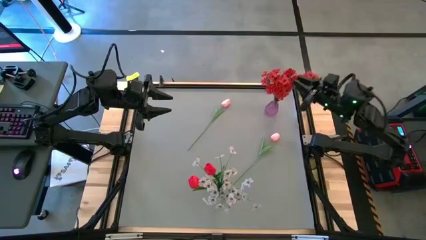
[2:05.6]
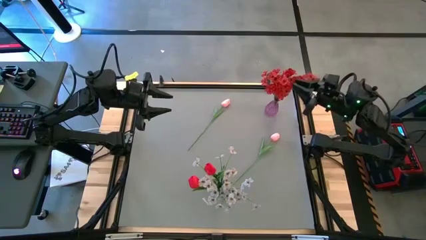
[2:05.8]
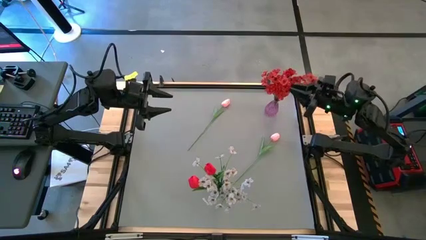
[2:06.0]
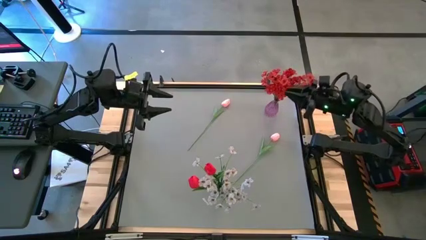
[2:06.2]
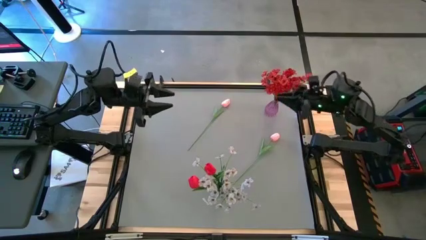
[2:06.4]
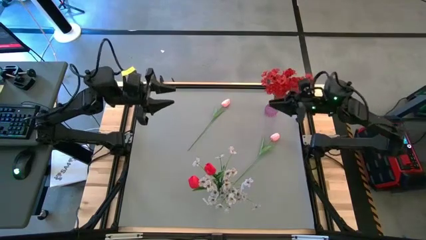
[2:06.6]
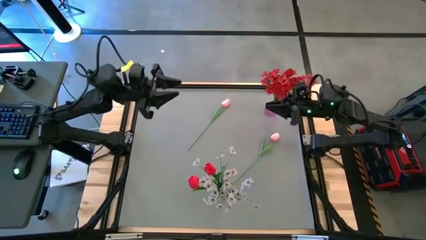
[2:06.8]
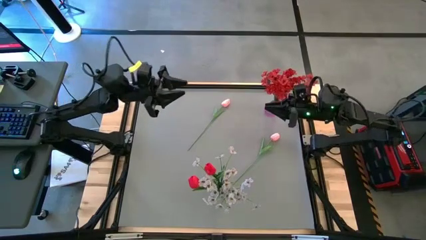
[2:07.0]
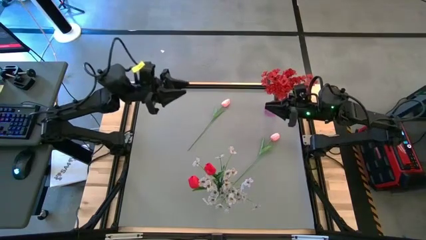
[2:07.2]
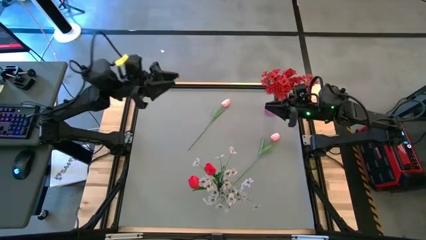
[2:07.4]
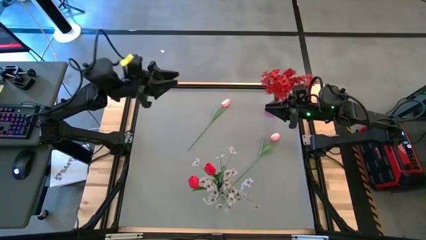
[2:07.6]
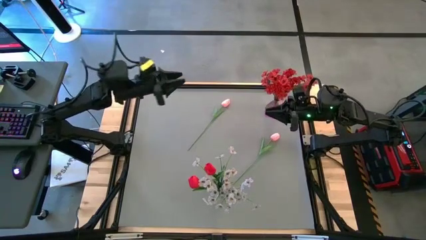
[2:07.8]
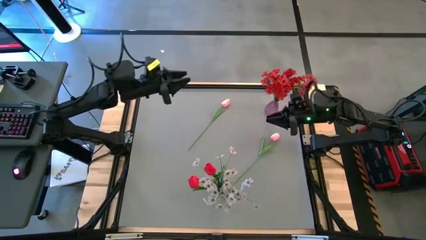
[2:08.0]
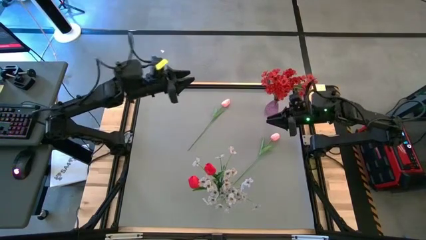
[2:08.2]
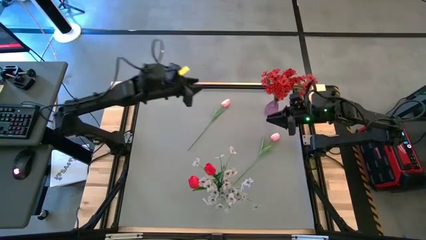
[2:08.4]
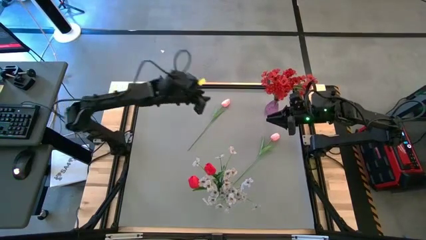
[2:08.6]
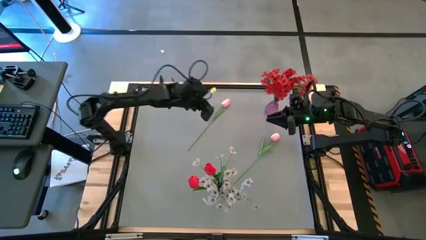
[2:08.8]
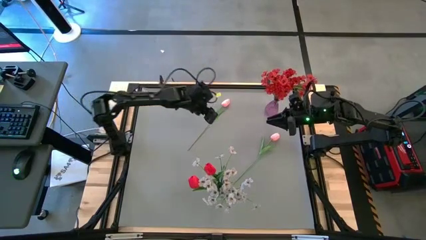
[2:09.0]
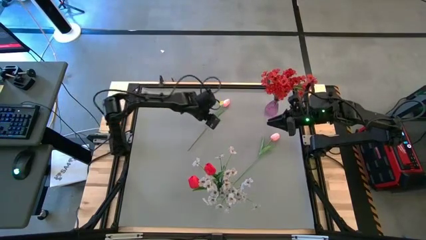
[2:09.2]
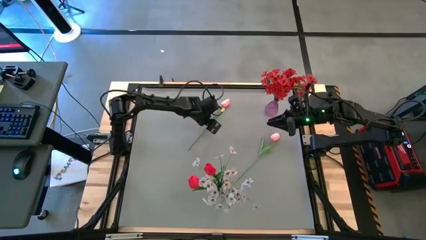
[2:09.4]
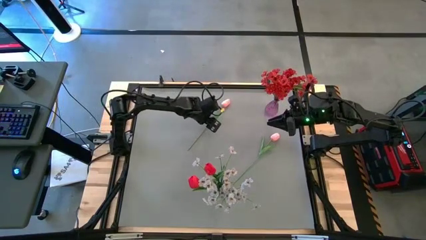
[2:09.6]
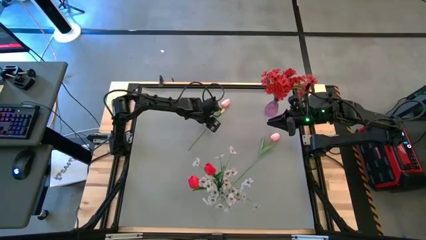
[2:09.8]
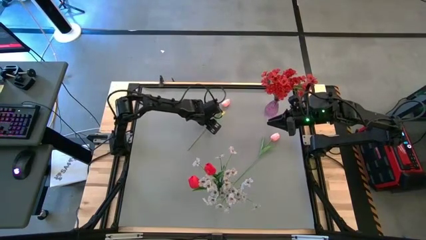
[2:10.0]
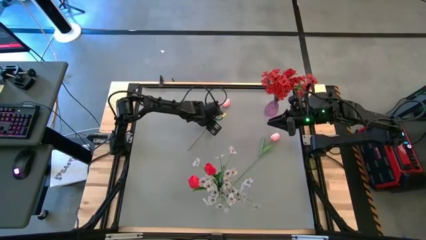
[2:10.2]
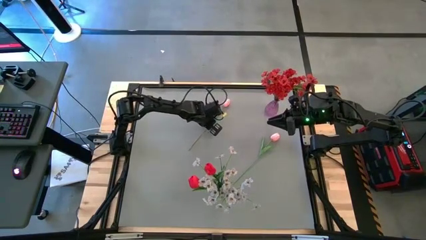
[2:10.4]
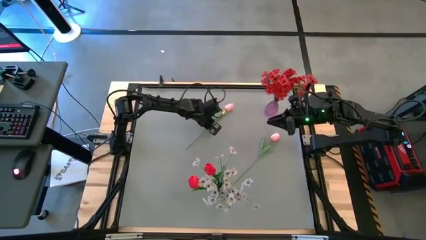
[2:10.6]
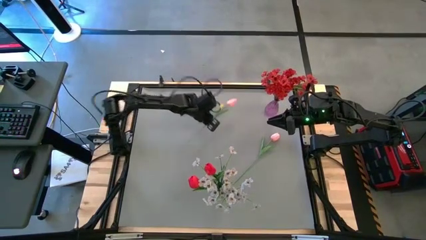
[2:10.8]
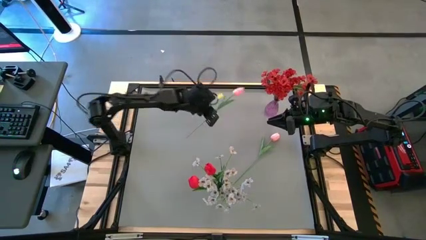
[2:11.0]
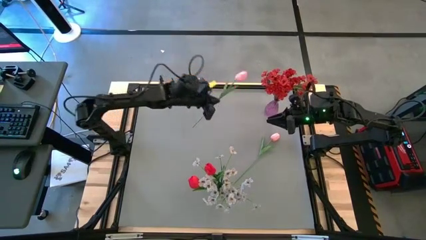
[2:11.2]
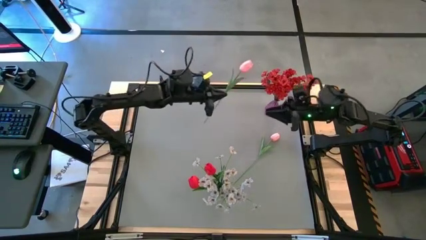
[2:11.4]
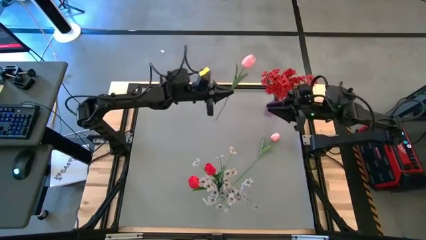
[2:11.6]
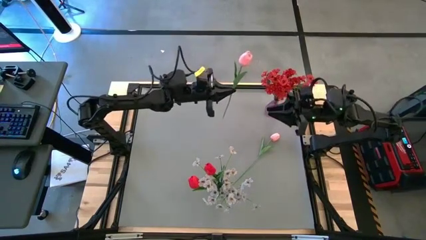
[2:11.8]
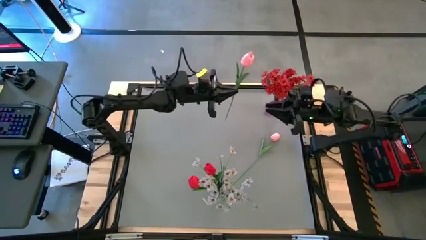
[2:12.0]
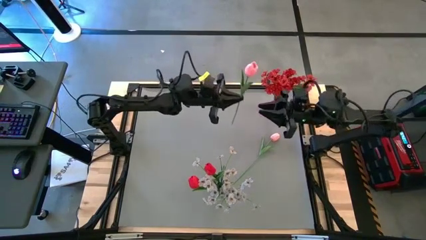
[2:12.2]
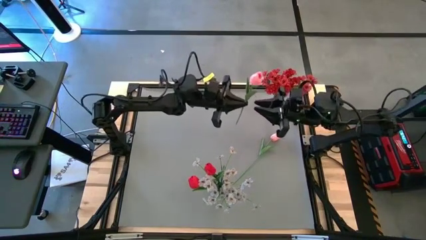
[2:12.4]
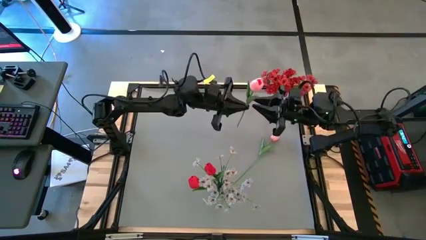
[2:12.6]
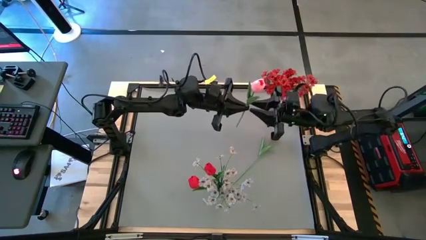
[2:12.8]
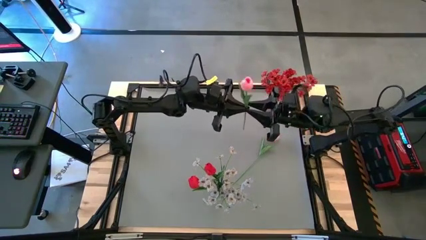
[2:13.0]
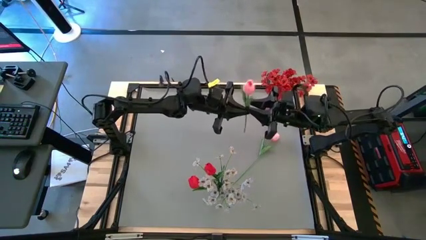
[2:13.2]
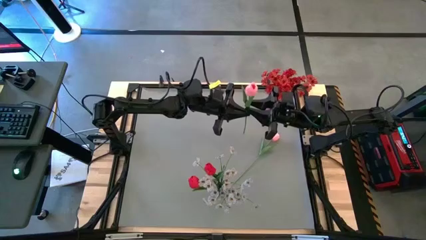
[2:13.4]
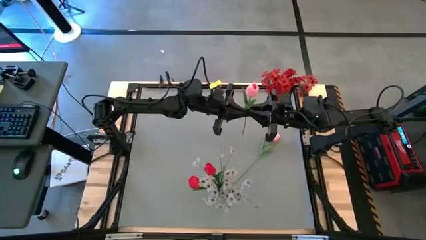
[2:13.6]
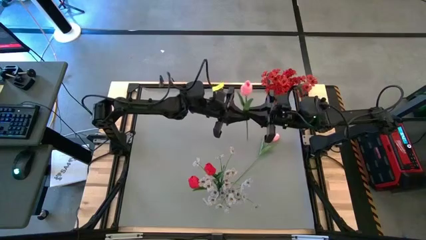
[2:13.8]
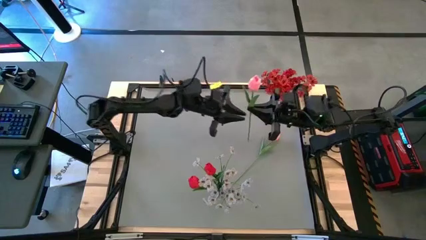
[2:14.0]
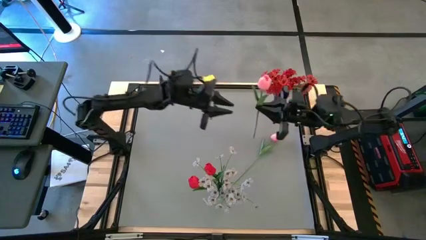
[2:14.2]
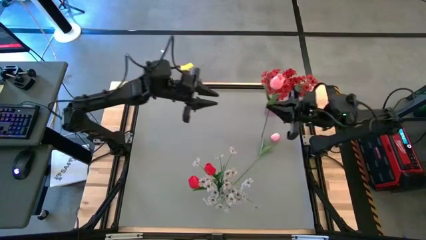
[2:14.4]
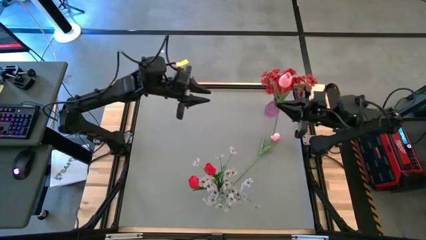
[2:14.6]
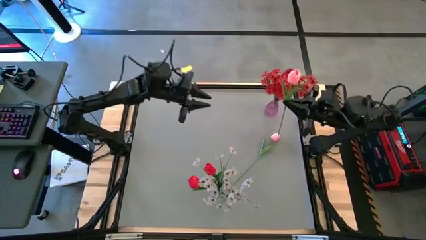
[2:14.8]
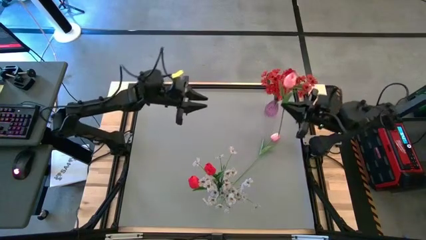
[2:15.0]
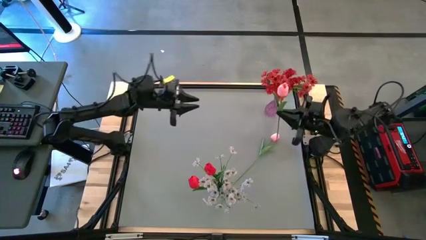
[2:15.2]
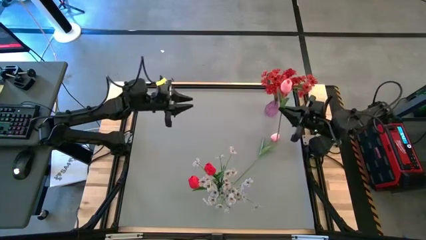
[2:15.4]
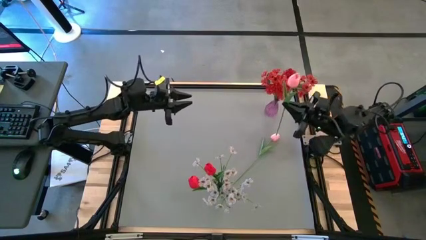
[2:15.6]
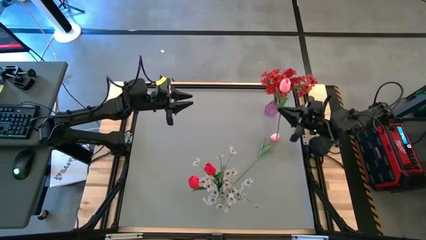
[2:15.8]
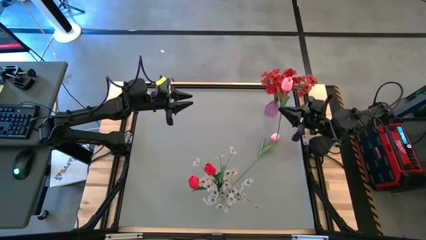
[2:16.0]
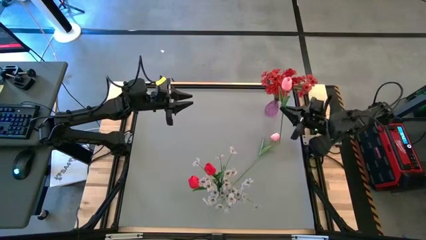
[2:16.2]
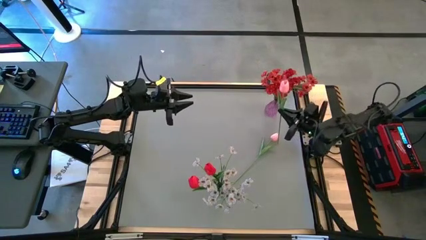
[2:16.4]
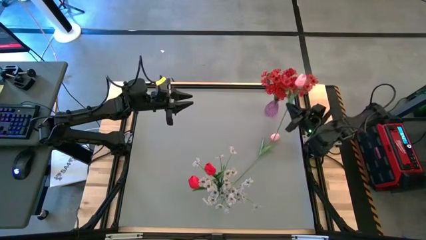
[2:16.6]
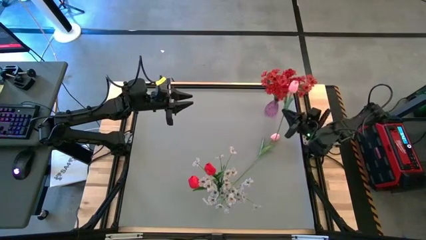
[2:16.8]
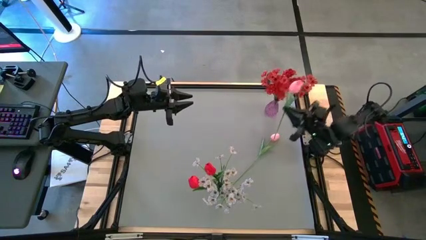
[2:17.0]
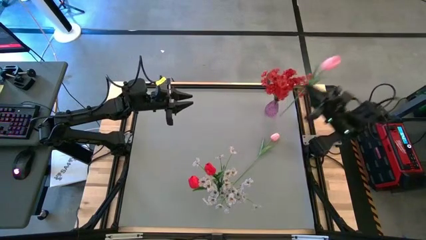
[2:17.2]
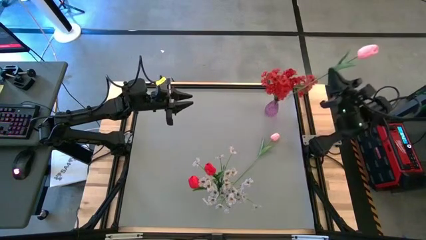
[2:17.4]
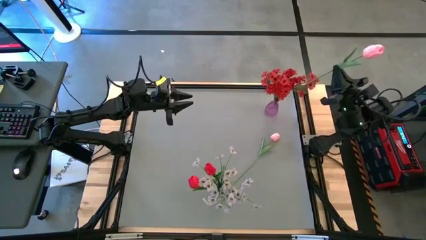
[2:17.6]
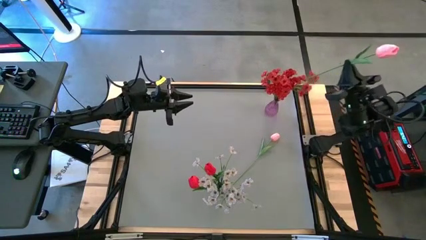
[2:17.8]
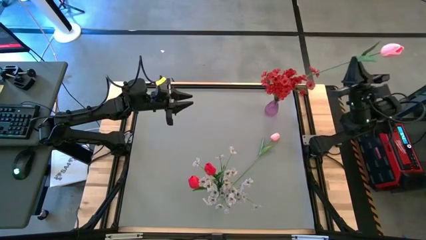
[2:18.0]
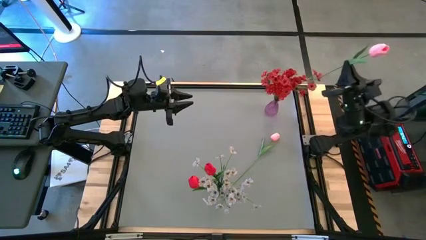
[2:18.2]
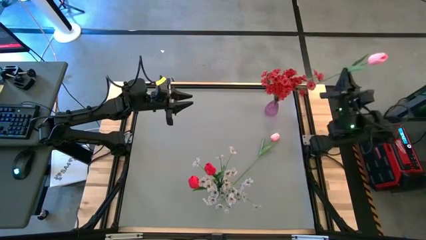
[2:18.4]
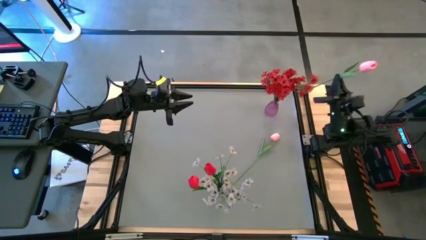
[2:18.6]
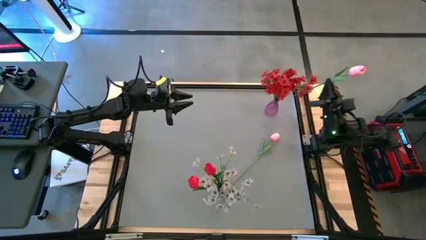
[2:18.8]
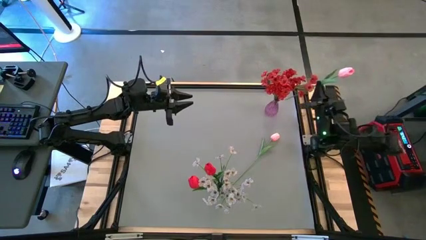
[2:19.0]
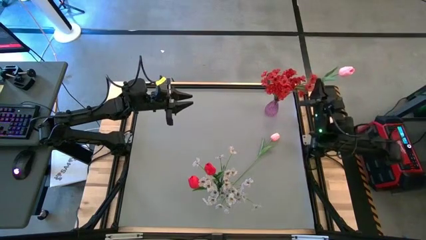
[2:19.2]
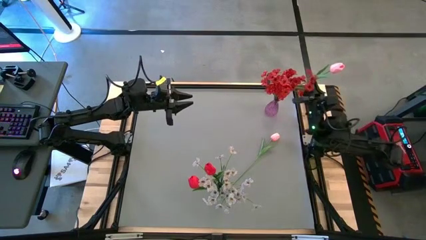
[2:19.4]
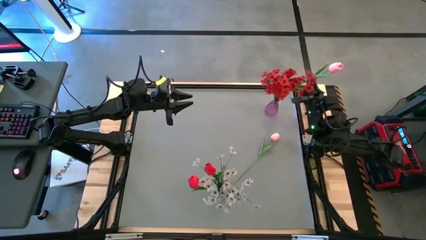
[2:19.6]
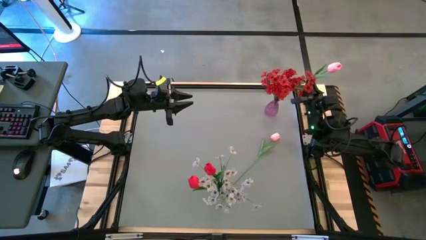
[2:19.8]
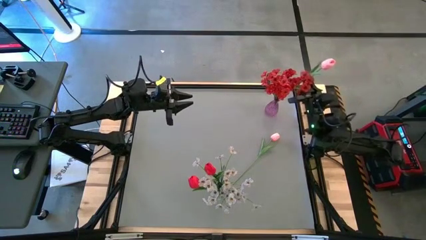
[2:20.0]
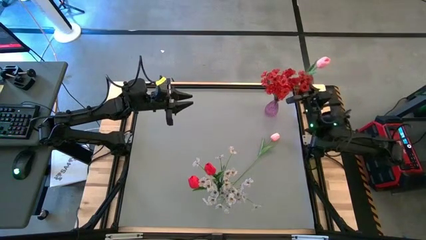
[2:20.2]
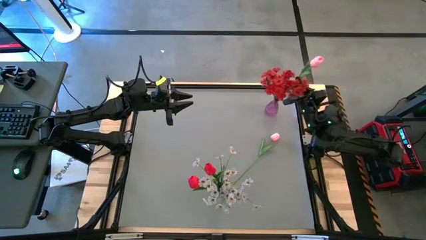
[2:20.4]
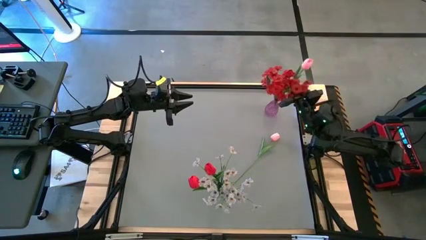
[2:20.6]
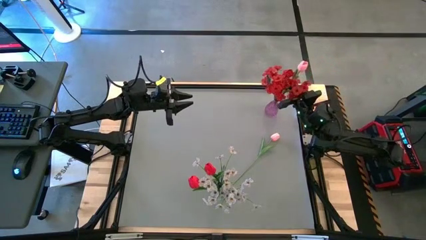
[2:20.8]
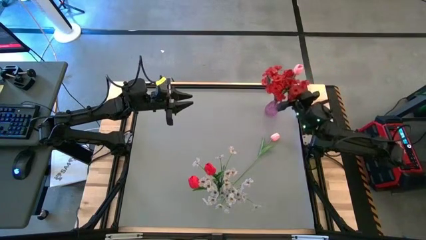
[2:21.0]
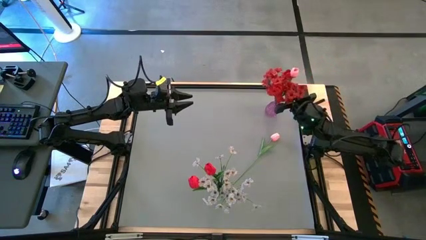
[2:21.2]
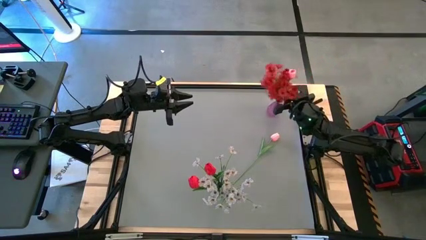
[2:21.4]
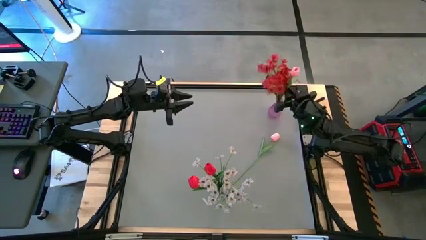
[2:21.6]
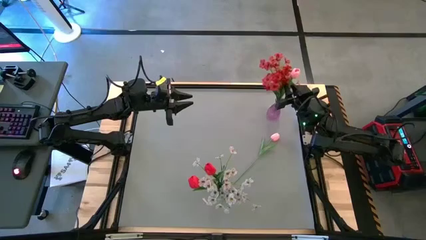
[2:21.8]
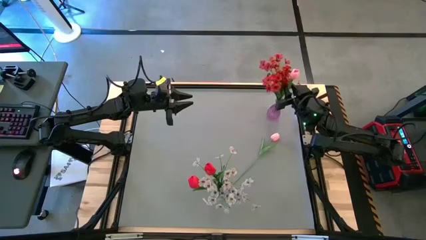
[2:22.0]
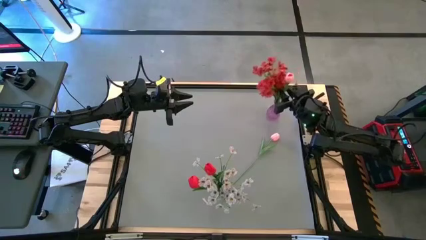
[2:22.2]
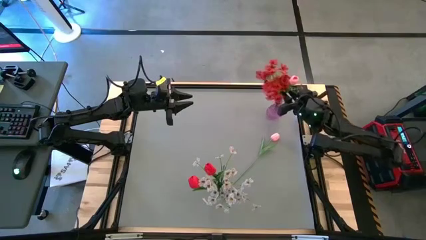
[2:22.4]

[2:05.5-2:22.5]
Task: Sort flowers into vase by color
Put the top pink flower into the violet vase
